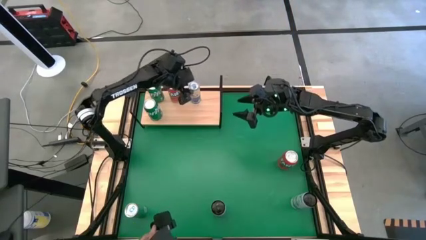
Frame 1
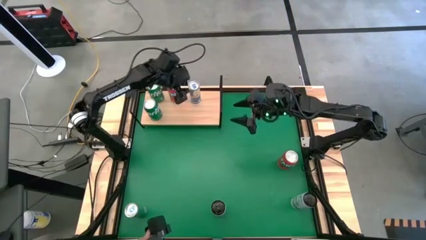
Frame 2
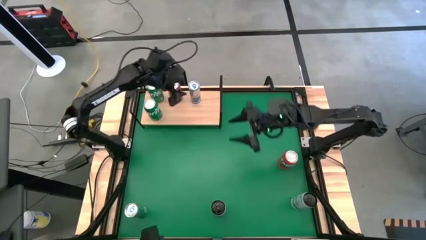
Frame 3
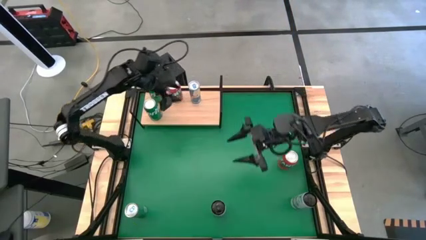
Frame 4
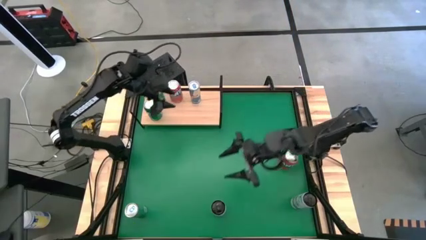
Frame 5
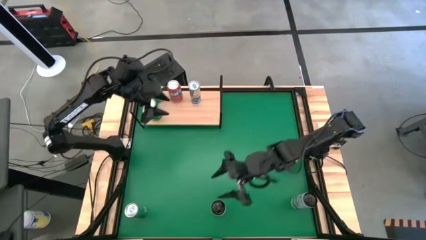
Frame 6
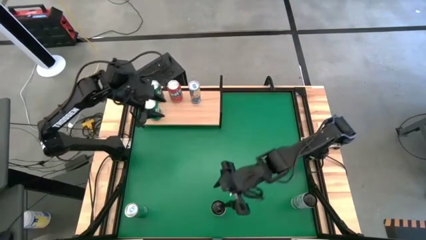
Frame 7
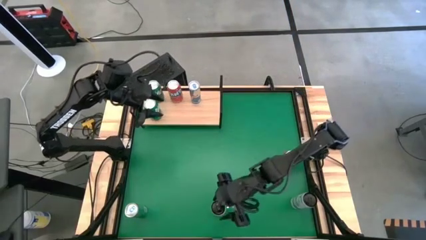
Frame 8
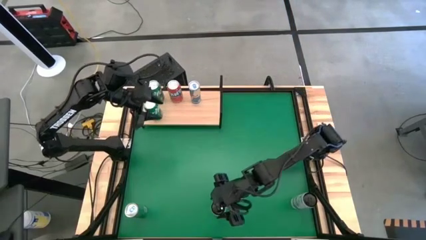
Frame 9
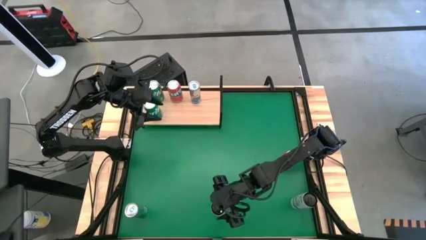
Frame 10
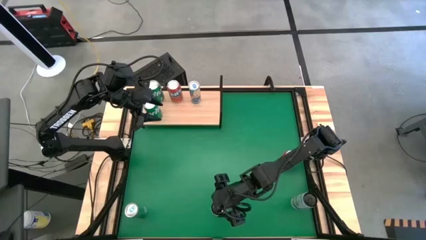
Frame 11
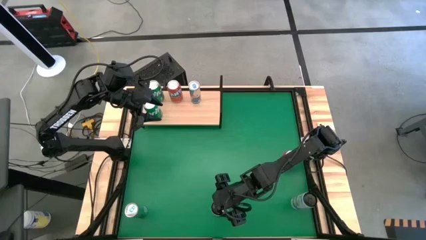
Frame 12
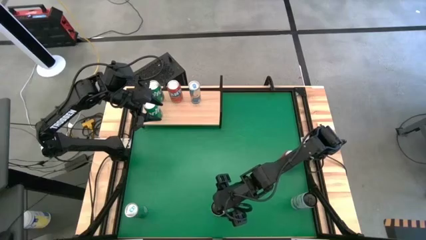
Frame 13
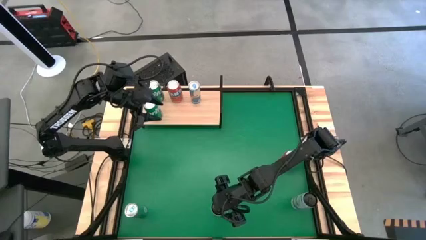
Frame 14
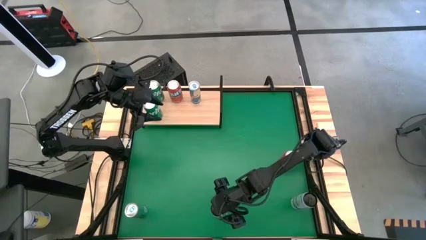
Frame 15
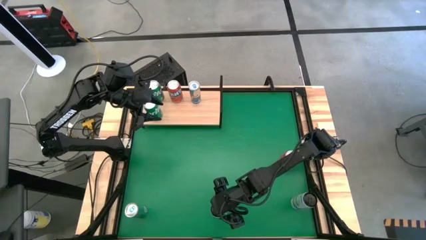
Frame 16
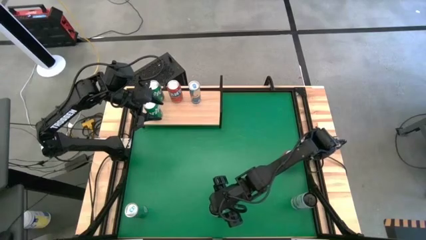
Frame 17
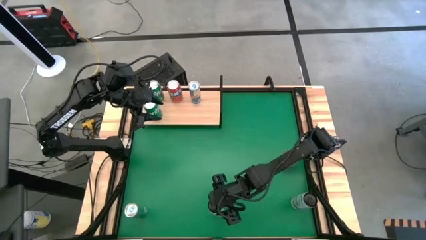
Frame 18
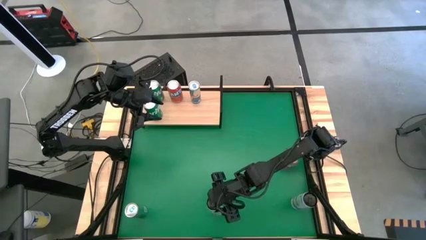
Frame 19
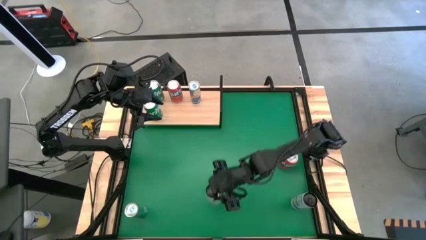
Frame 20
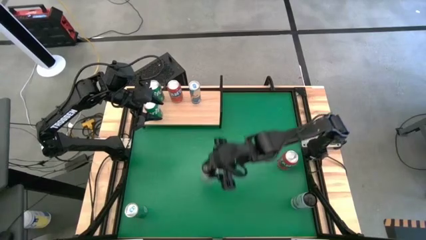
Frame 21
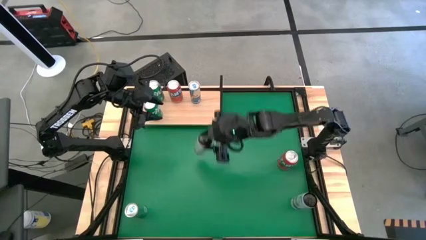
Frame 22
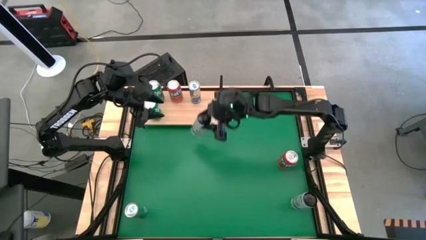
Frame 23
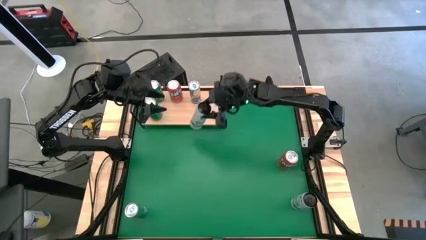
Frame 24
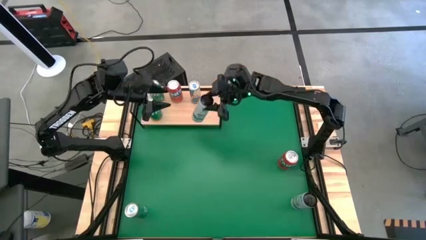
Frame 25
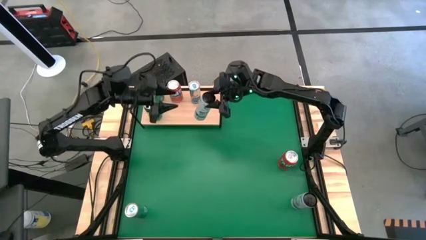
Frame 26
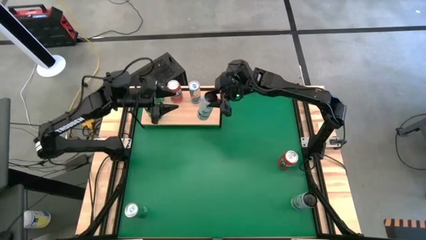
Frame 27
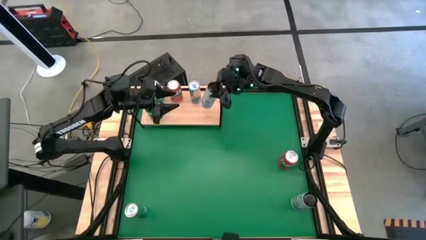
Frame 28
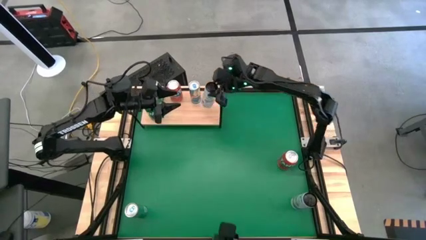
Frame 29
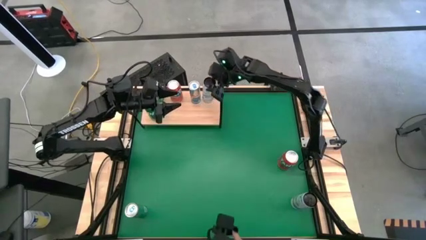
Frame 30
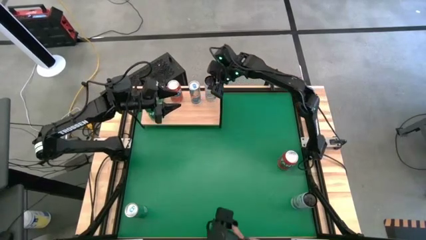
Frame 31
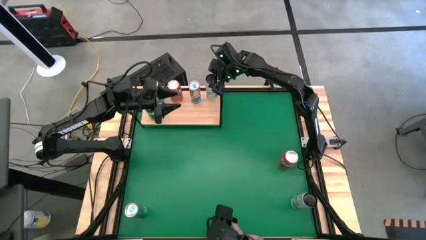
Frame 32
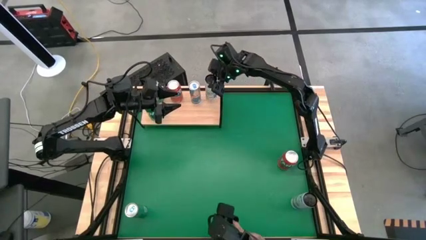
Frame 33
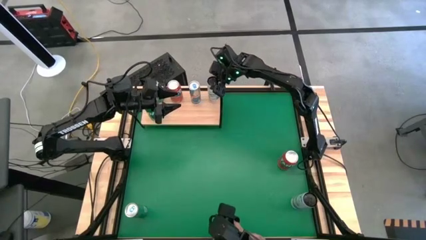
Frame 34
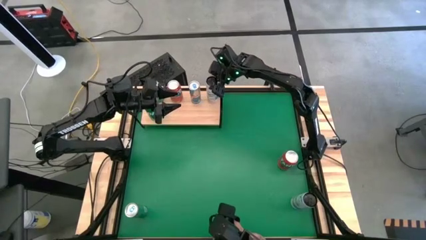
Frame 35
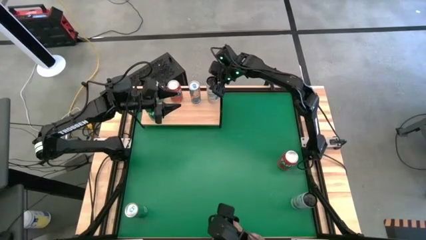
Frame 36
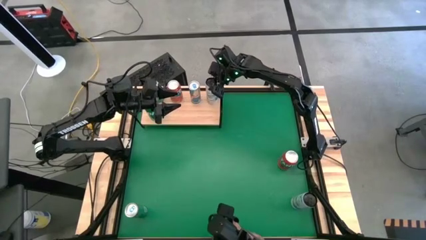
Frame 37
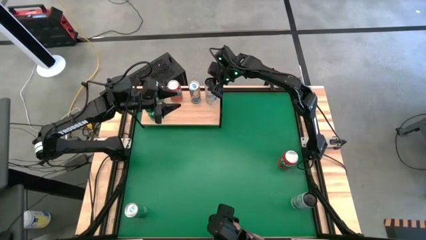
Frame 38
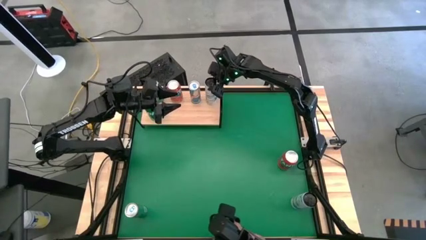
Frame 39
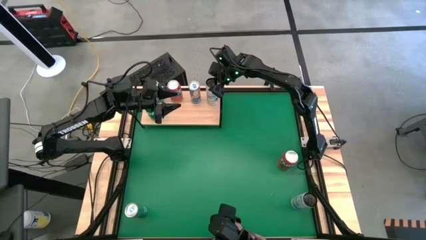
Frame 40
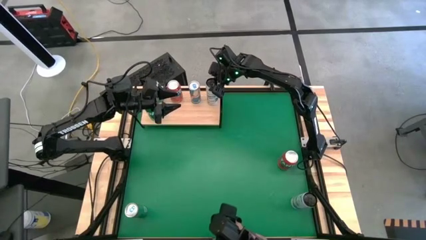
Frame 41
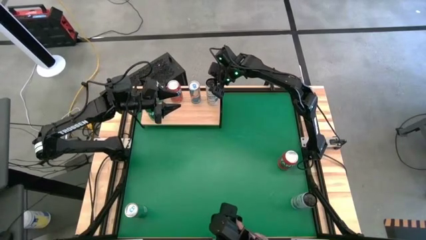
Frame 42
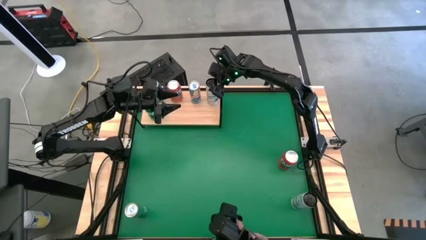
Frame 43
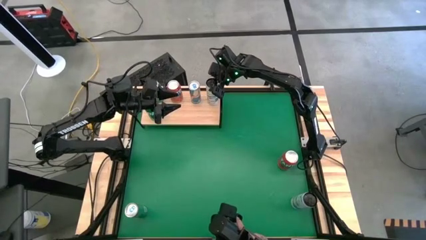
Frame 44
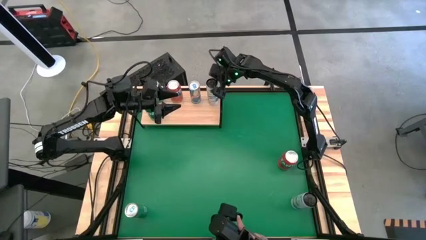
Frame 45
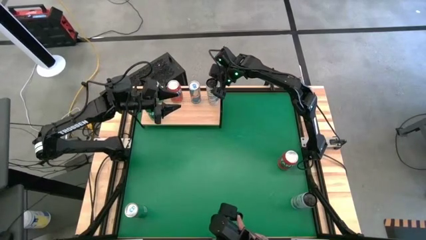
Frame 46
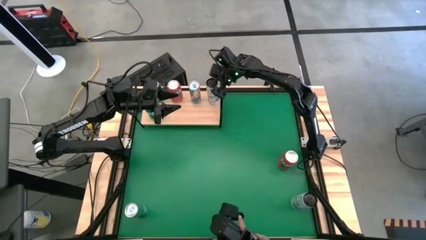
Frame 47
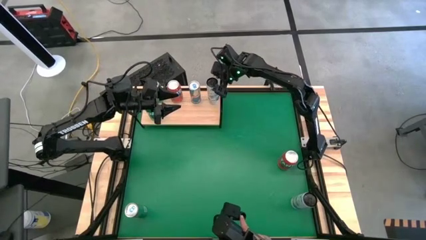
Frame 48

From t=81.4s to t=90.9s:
Task: Place canned beverage on shelf
Put the left white and blue soda can on the shelf

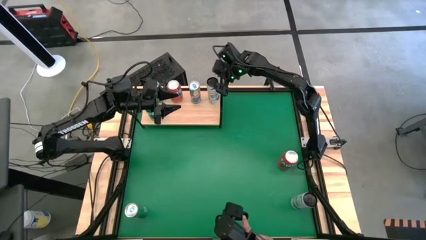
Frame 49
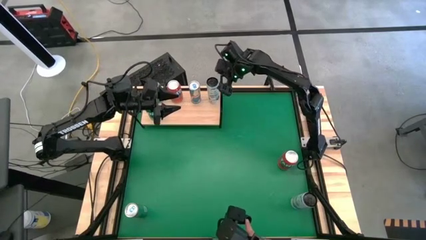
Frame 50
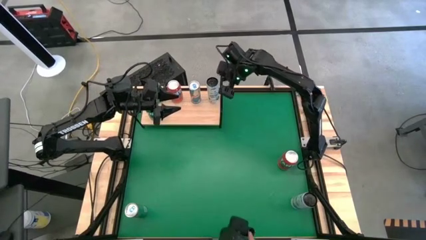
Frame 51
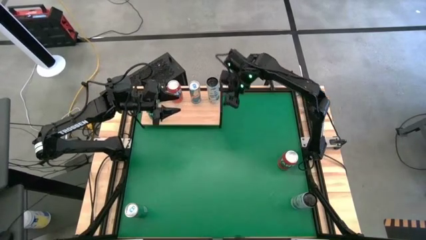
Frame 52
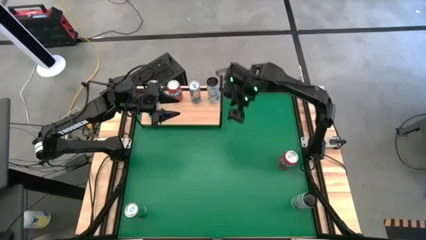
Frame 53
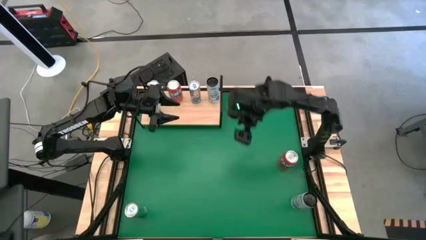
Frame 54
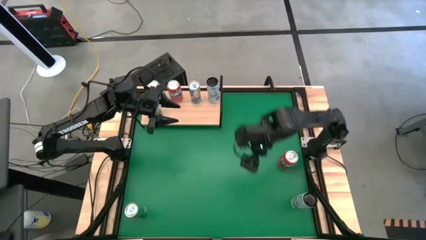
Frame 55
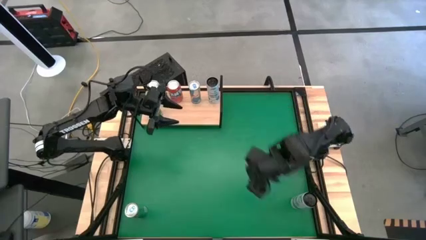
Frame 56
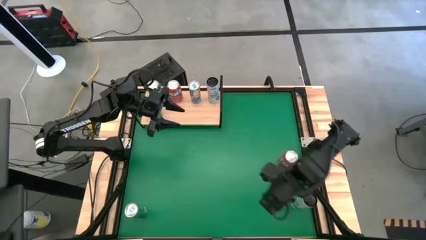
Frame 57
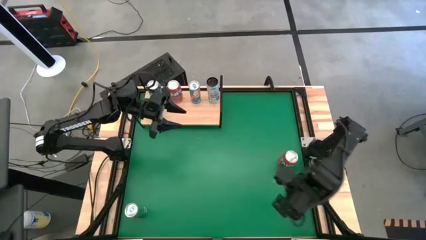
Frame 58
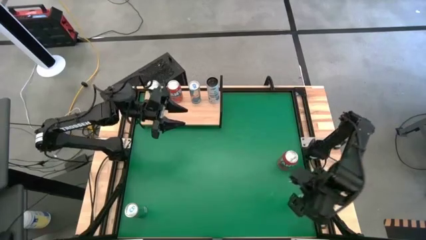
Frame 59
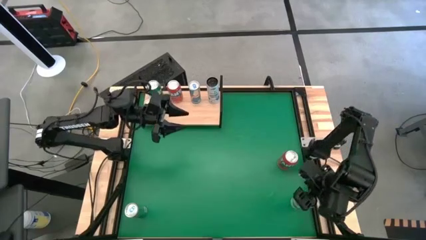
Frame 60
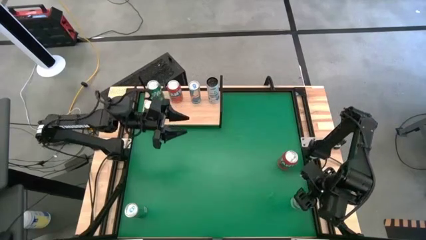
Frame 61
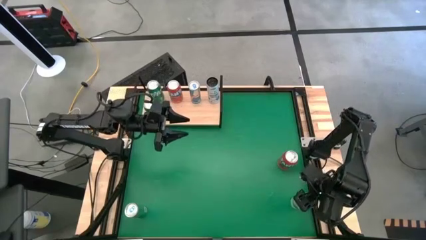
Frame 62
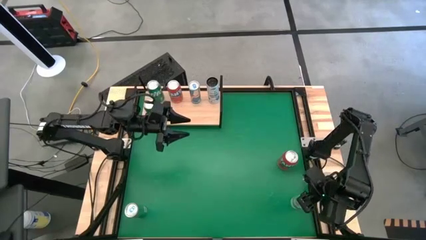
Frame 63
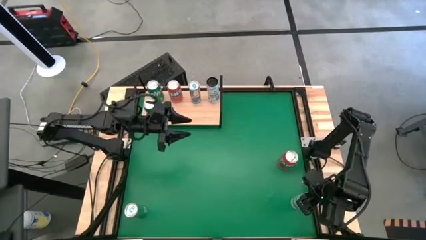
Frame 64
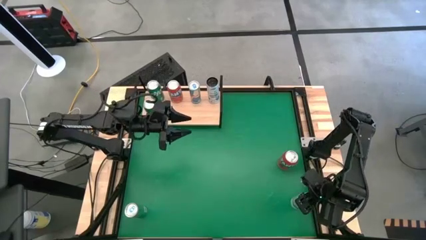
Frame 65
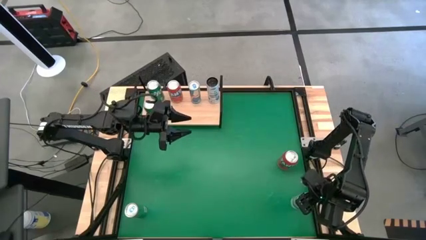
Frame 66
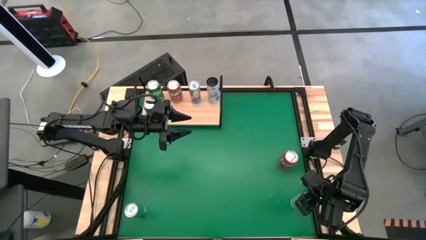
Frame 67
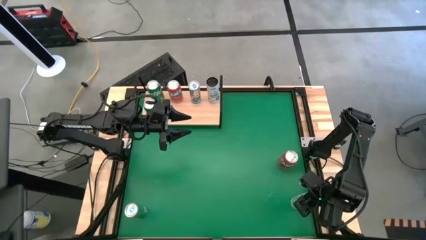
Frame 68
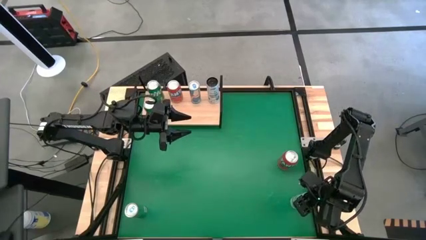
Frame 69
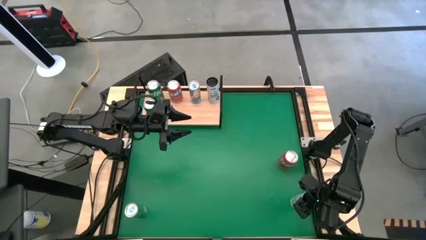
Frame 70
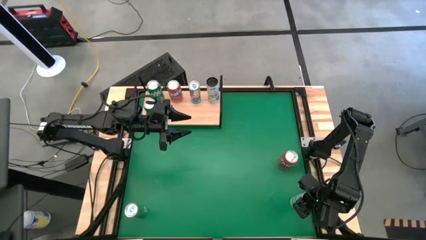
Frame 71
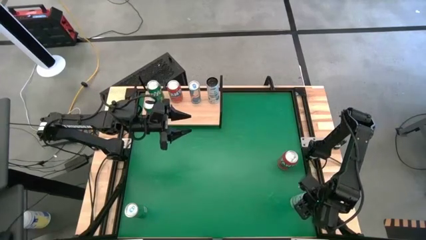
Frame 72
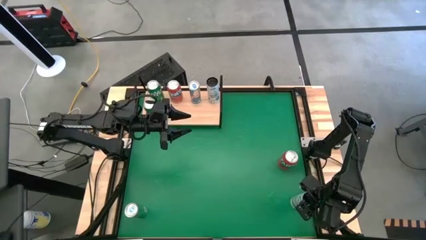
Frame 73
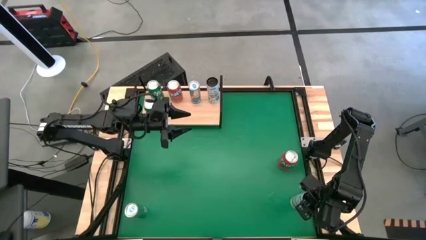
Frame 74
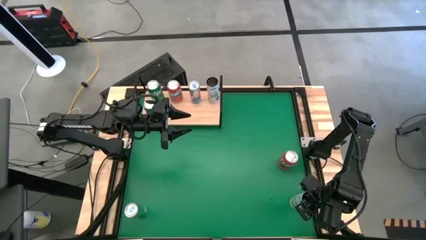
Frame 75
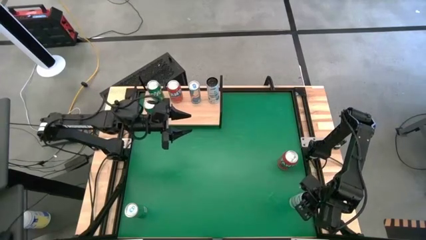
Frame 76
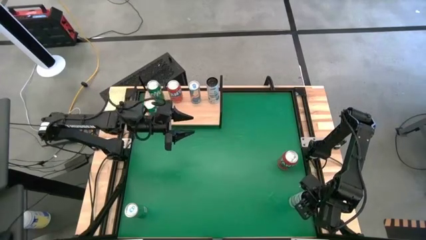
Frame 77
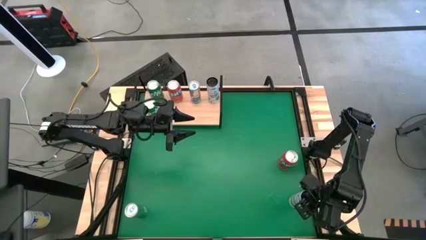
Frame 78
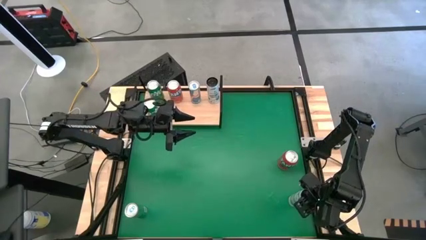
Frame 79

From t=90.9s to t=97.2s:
Put the white and blue soda can on the shelf aligned with the other white and blue soda can
